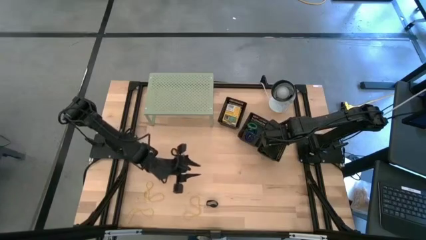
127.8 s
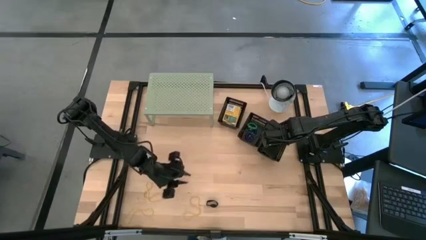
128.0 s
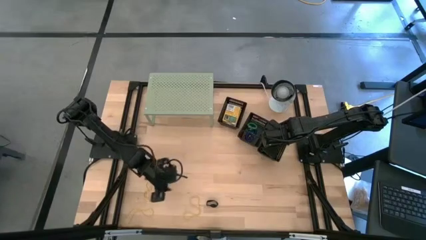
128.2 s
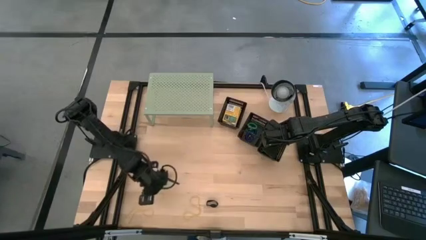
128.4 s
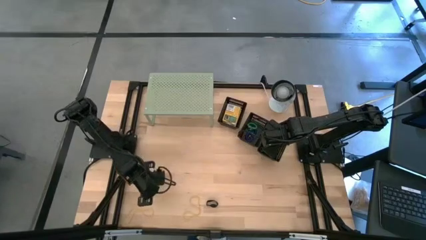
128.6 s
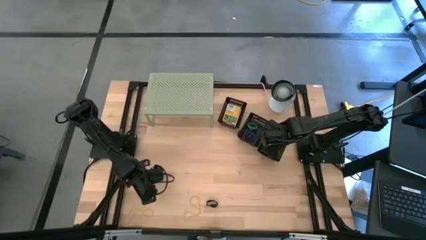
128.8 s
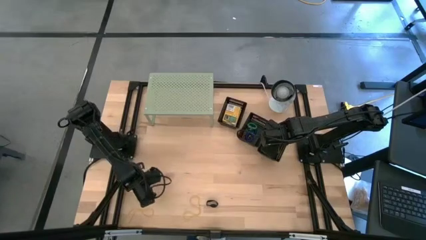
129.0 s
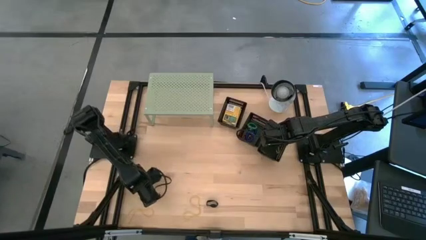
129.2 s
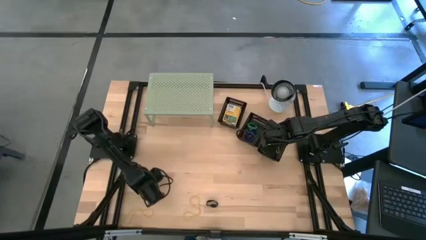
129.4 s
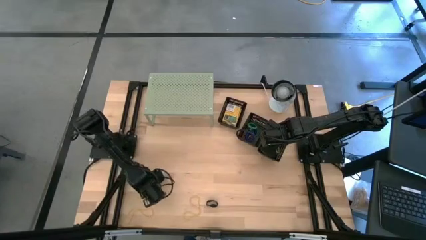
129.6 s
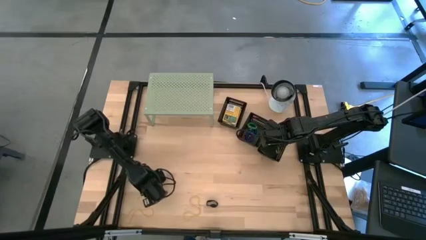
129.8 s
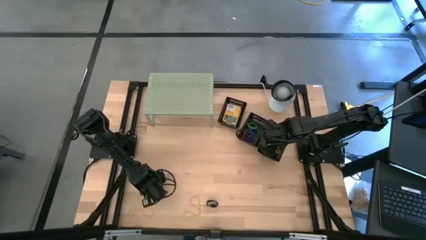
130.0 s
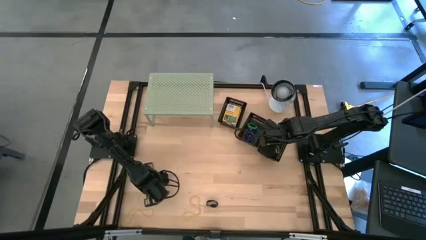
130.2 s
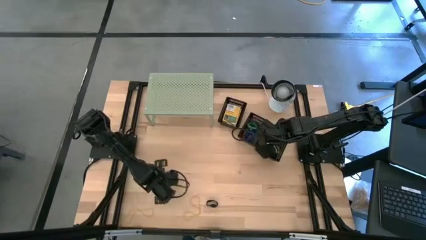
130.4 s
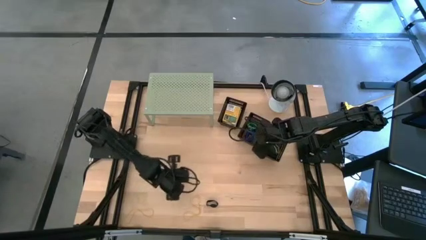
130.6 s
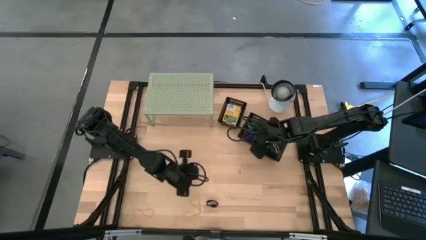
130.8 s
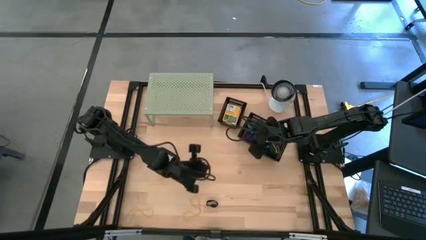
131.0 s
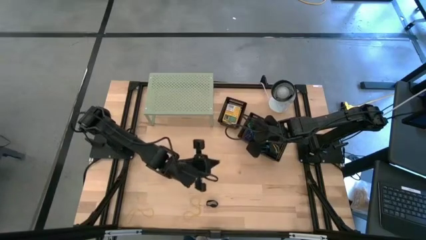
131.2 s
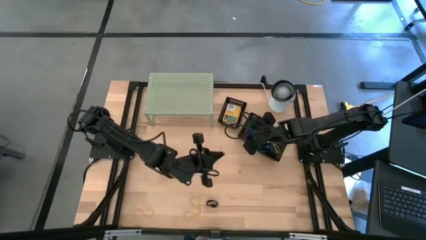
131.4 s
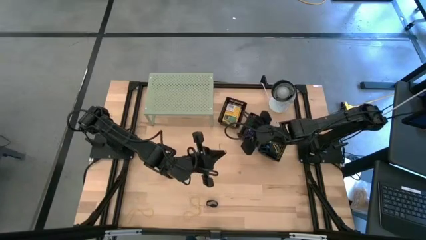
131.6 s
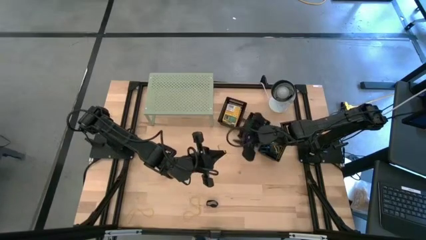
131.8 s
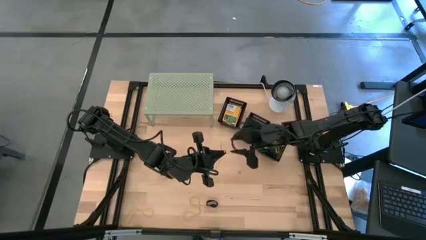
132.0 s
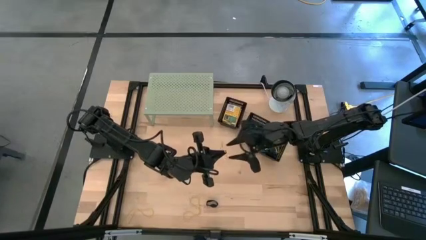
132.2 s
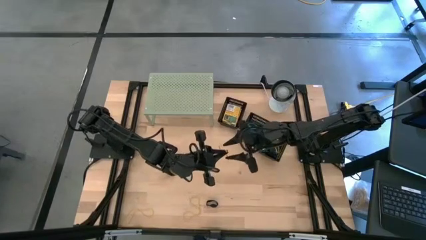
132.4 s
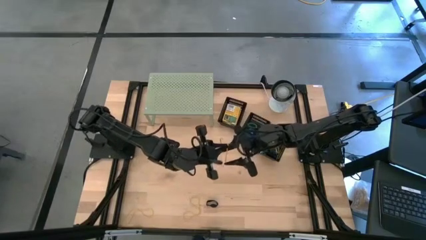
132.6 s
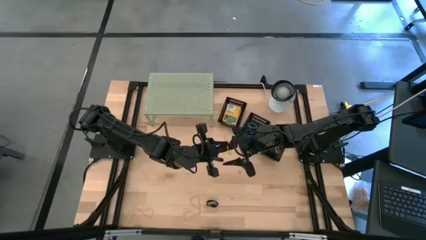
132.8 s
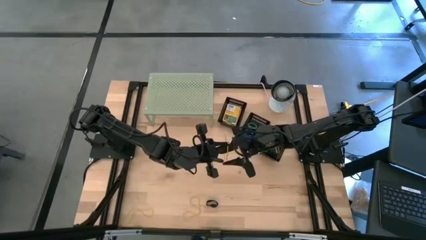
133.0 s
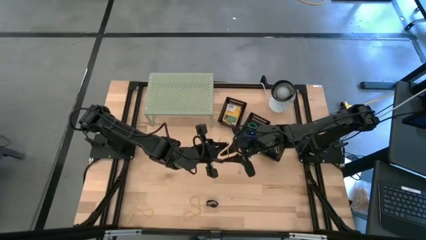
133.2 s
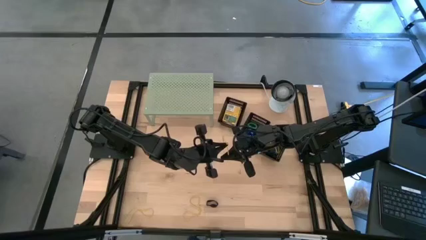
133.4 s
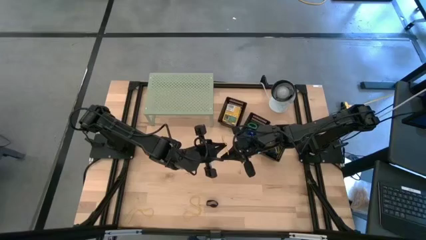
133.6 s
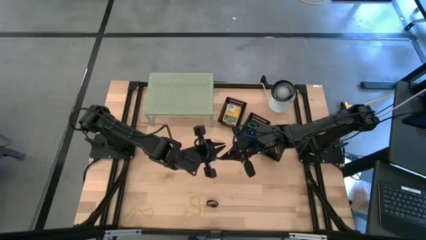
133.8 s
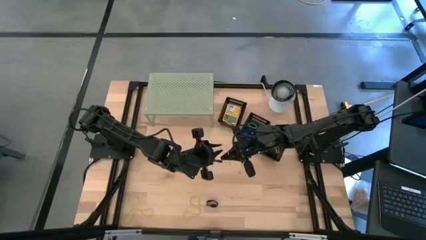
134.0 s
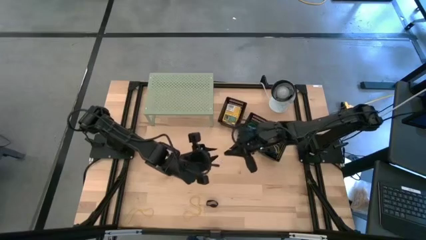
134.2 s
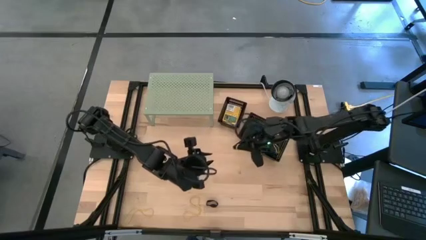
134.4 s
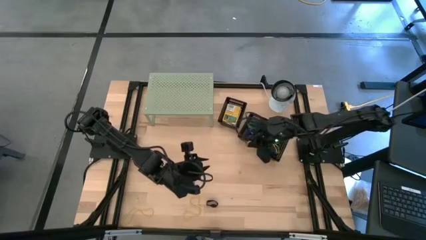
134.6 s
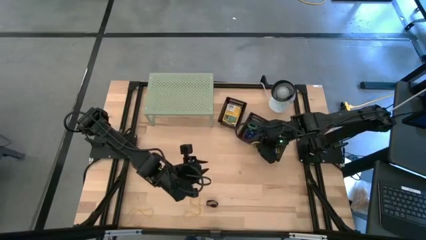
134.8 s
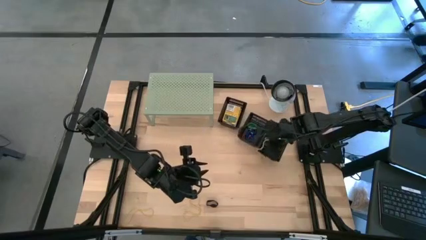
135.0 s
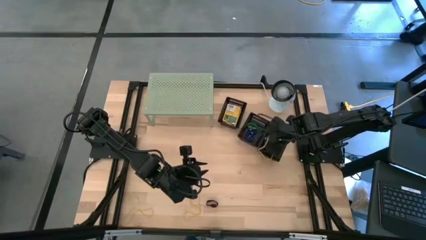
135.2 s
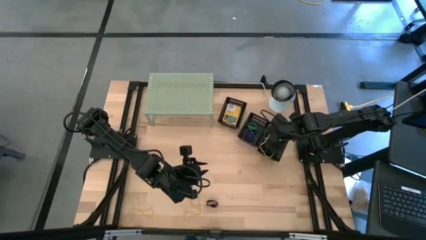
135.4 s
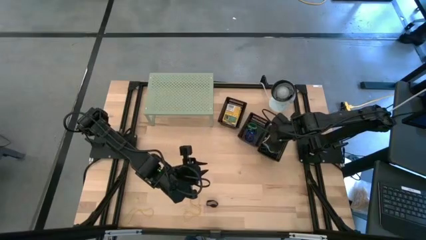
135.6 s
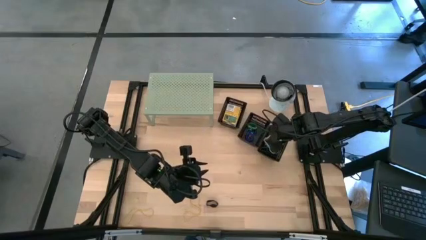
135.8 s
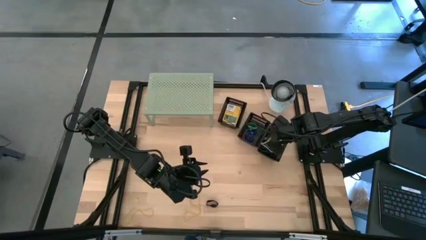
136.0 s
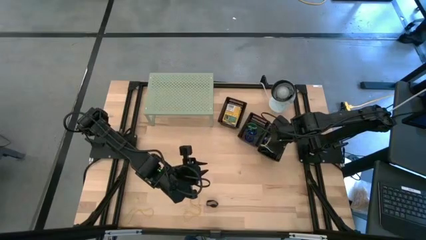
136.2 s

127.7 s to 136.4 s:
Task: Pick & Place Office Desk Supplies
Put the yellow rubber band into the bottom black bin
